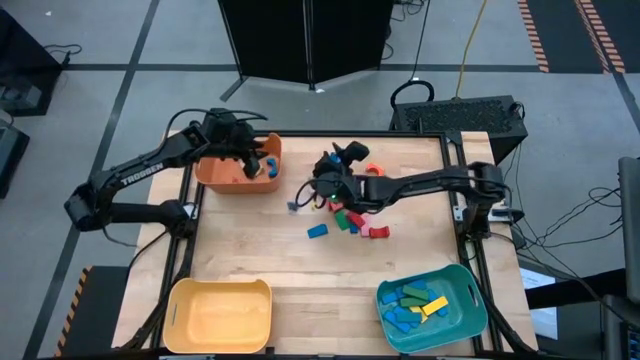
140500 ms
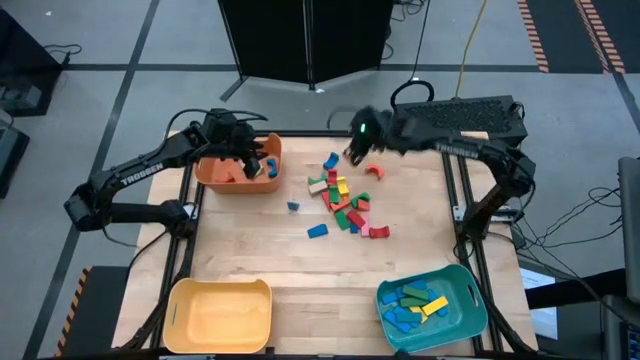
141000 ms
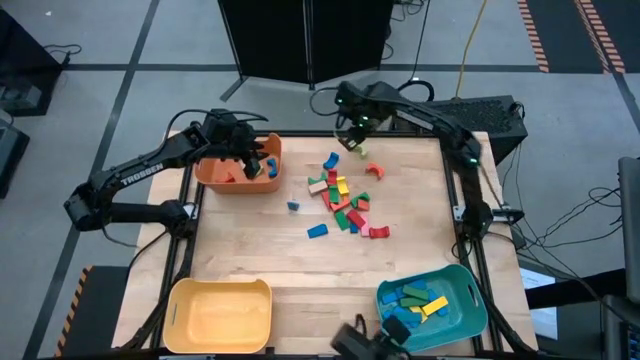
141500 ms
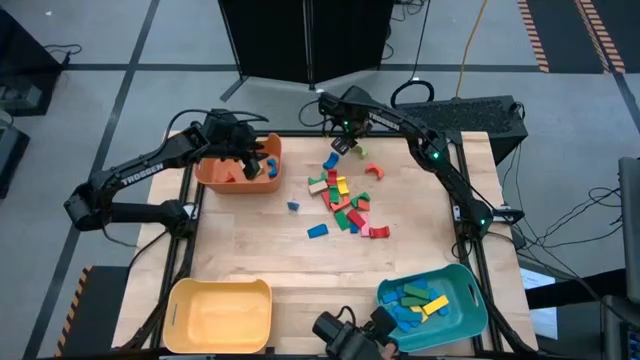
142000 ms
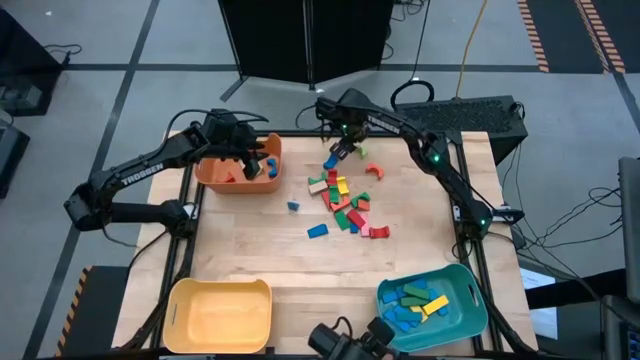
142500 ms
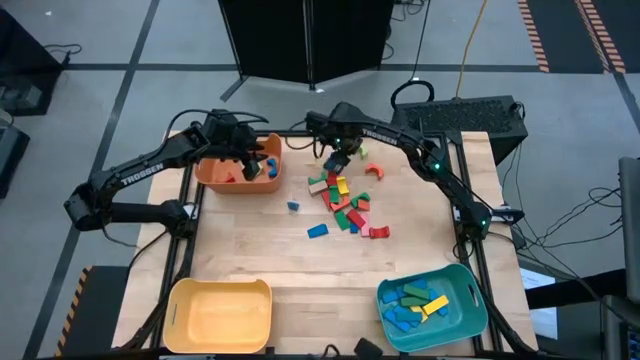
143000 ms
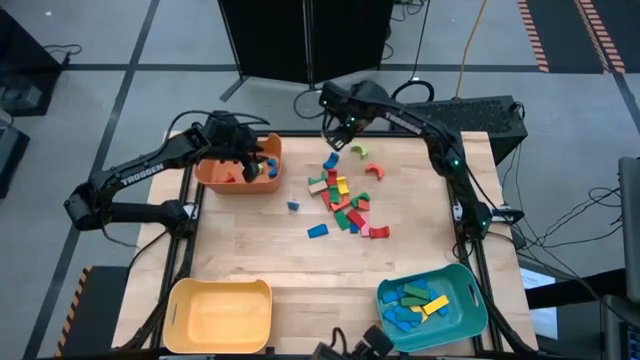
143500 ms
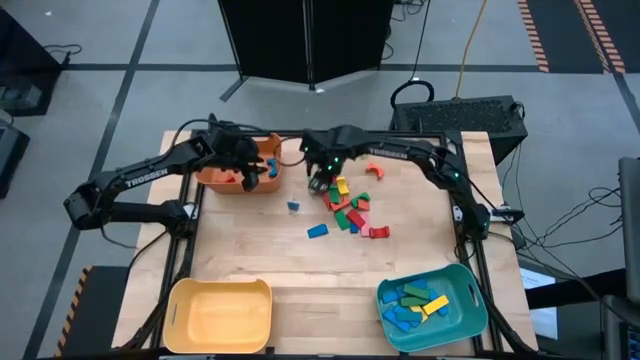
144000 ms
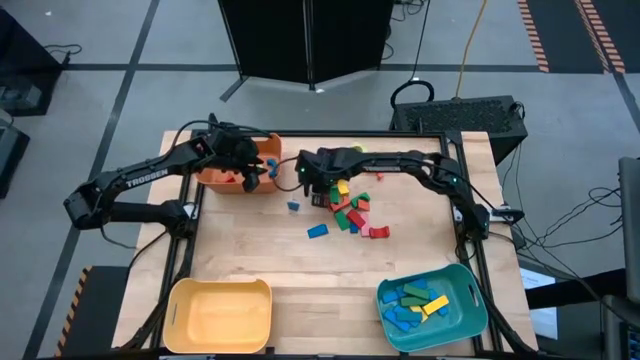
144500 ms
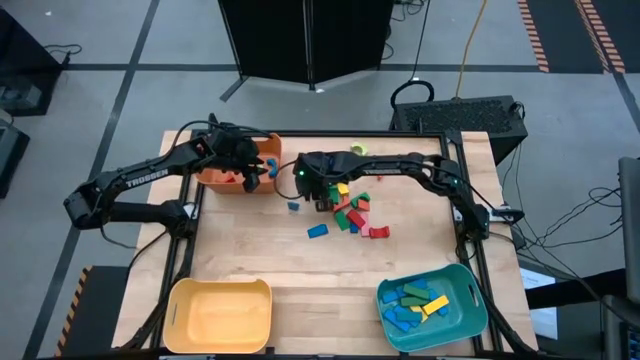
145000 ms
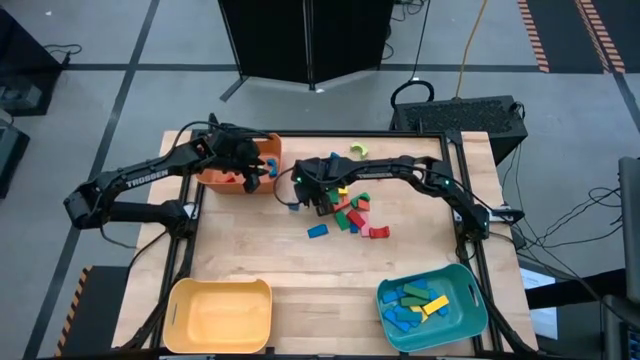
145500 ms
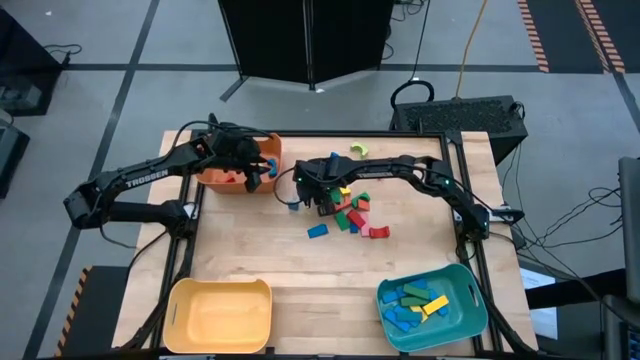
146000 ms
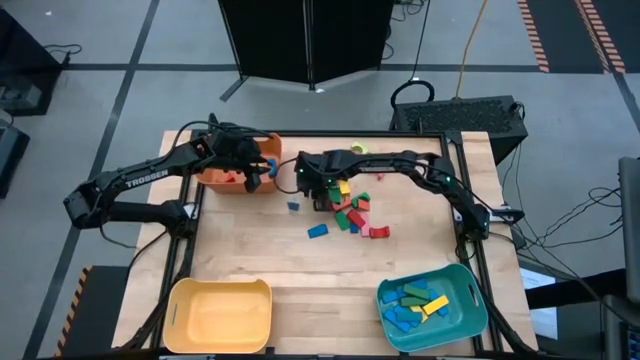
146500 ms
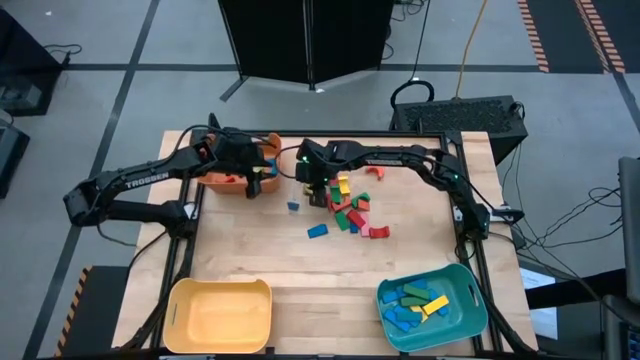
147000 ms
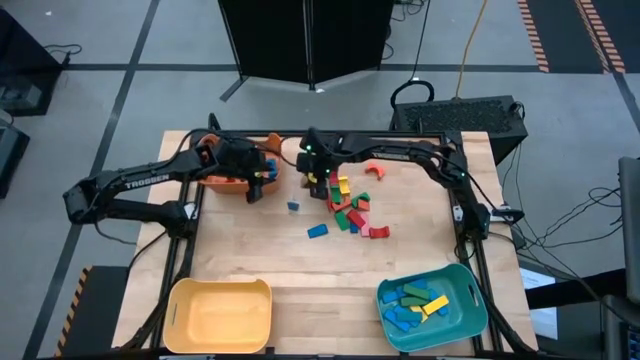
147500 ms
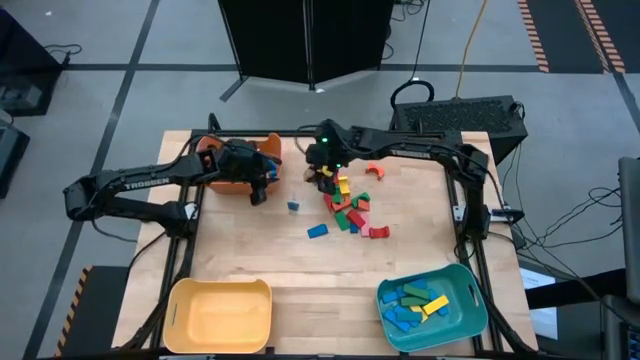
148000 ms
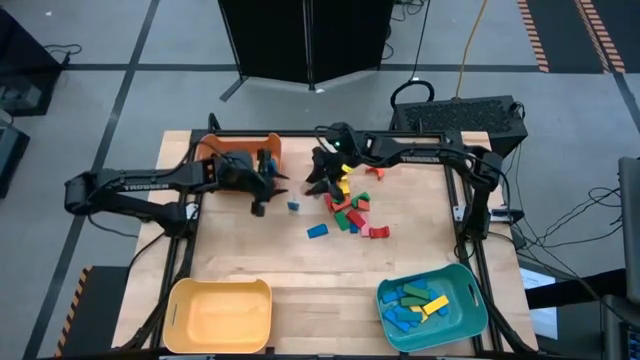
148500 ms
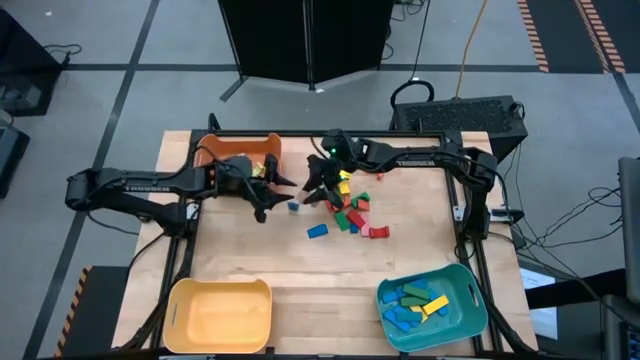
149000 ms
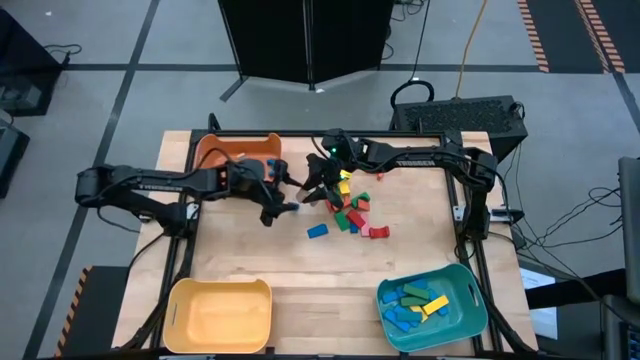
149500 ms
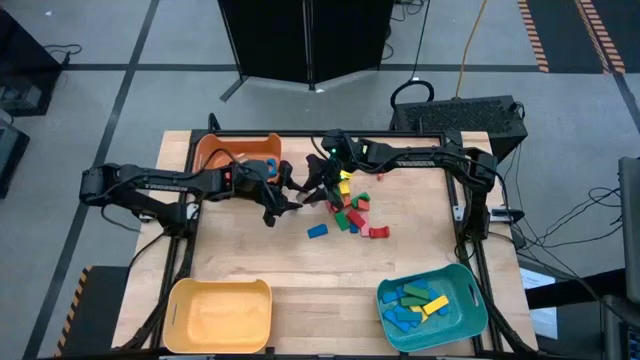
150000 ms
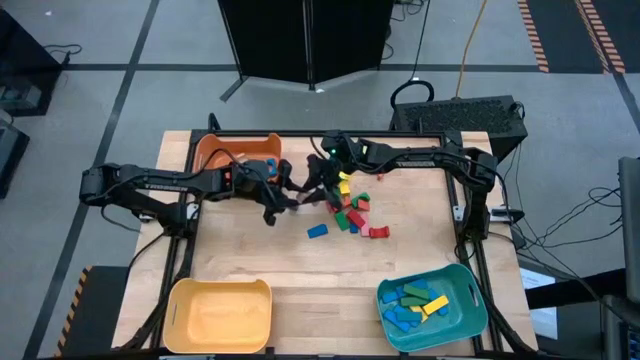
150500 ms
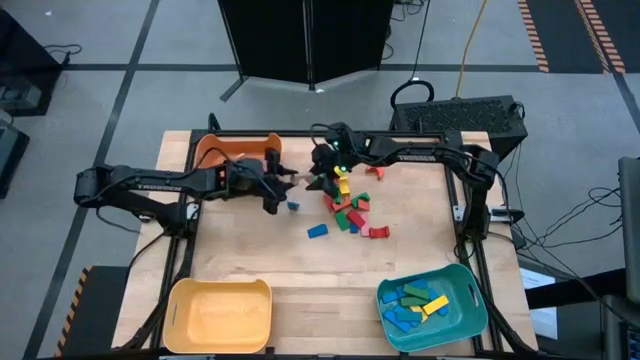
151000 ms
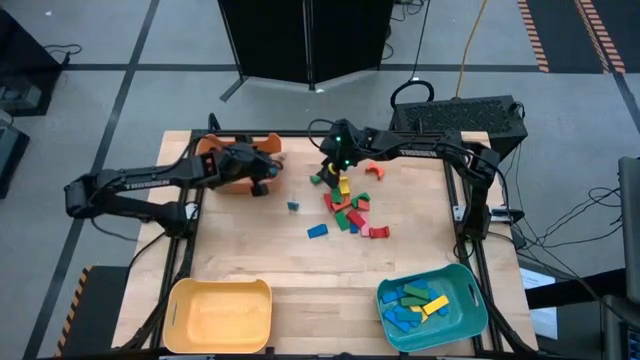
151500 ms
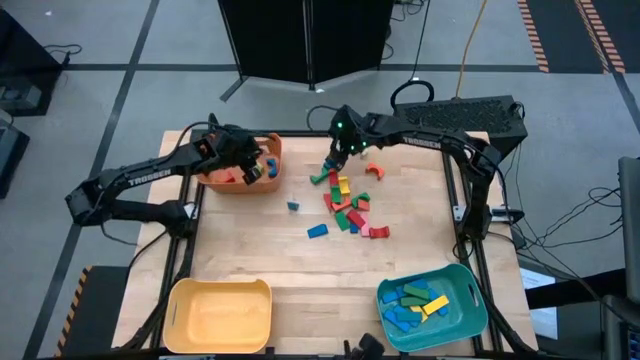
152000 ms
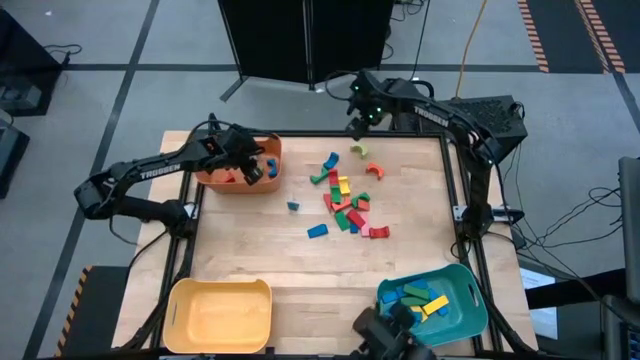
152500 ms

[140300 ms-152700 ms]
Task: Sort blocks by size
Put the light brown arch block into the orange bin

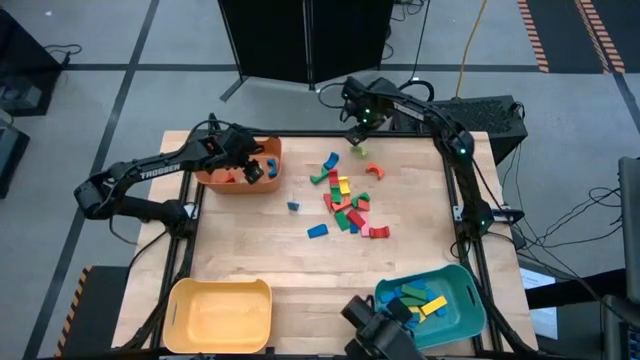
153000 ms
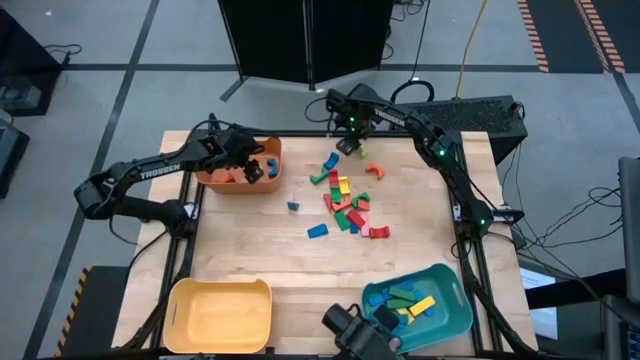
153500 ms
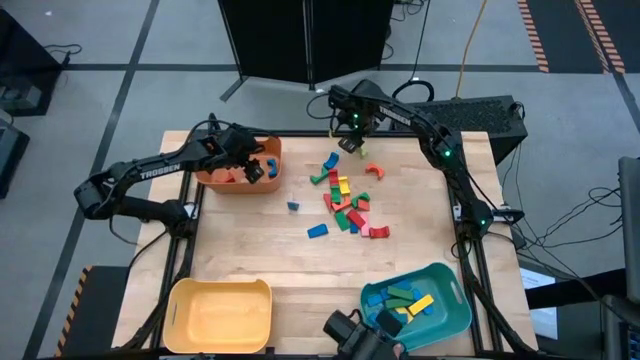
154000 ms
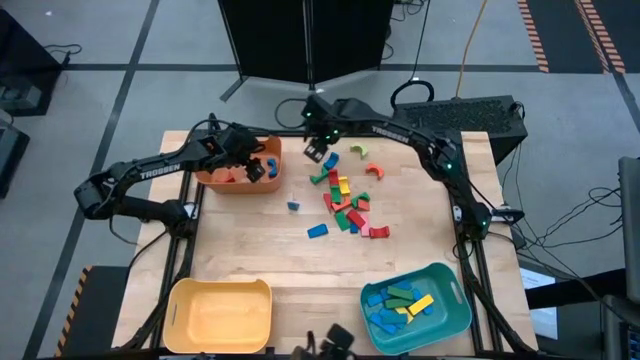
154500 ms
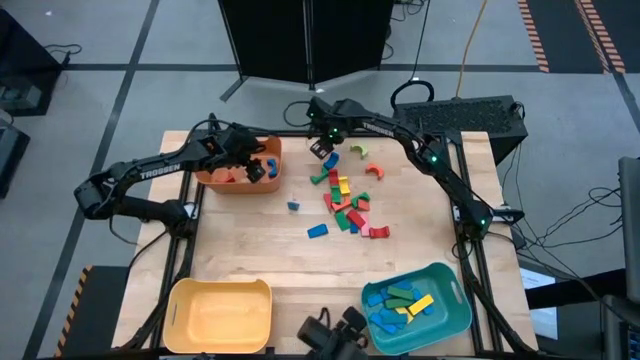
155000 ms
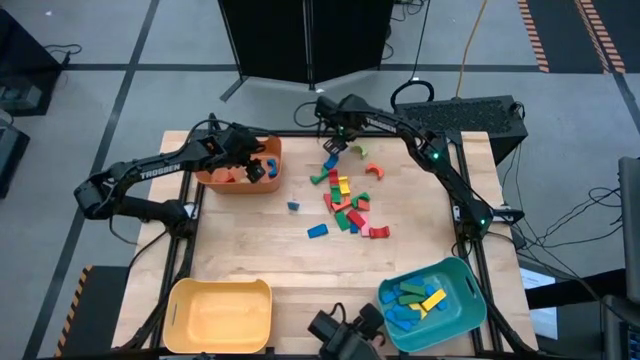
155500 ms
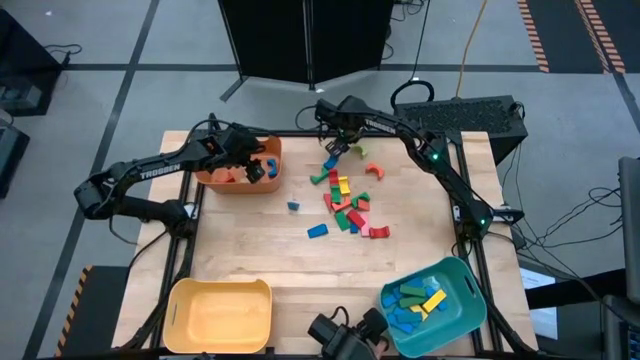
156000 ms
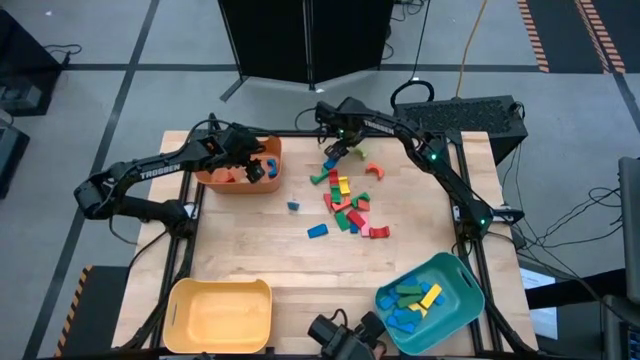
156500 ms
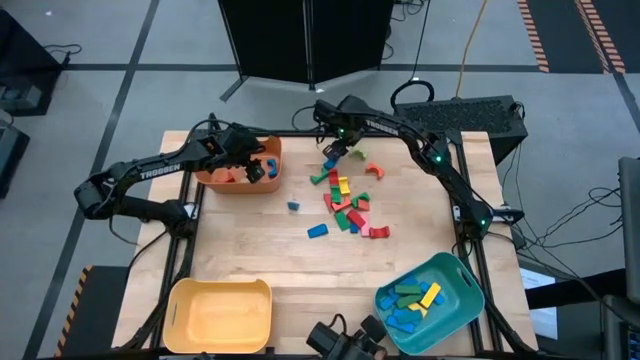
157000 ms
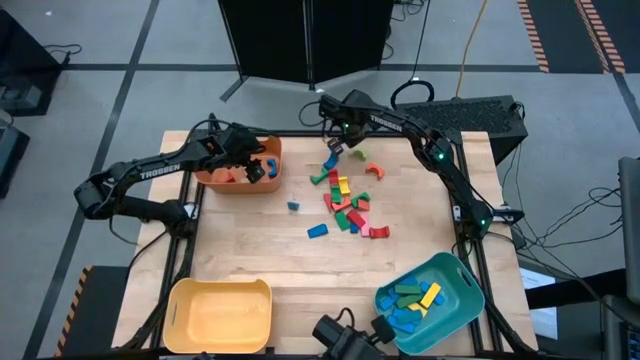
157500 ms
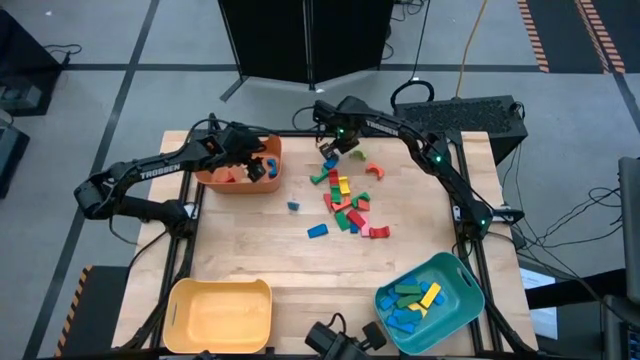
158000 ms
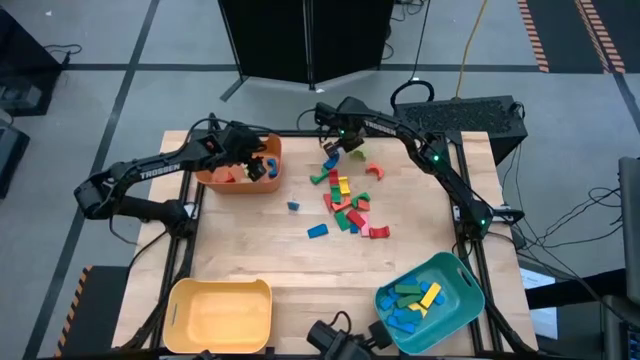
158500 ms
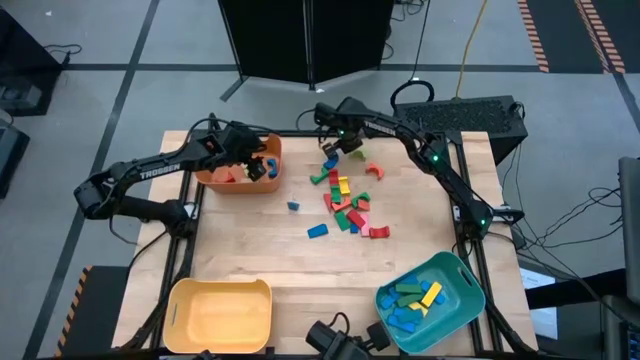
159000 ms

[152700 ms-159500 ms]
Put the light green arch block into the orange bin

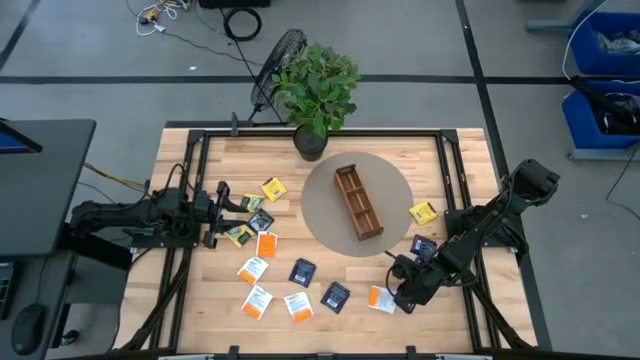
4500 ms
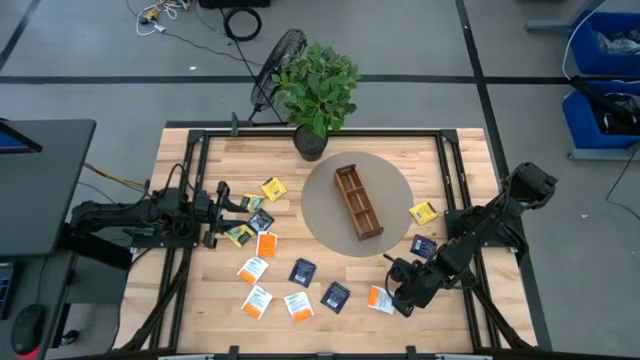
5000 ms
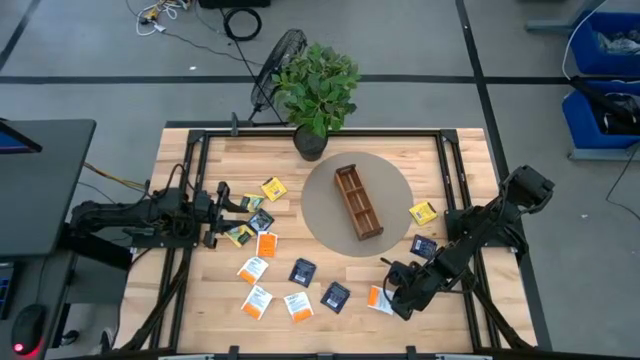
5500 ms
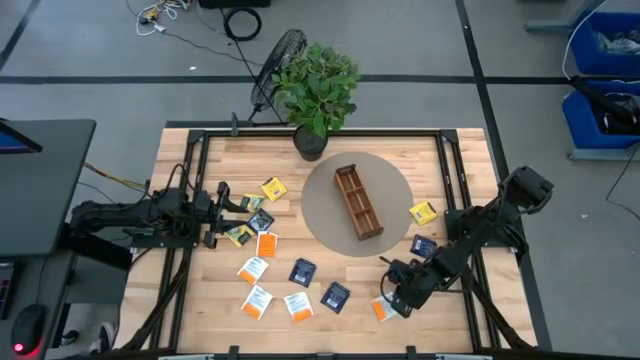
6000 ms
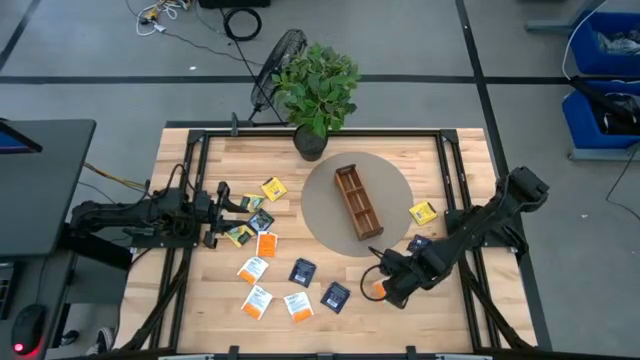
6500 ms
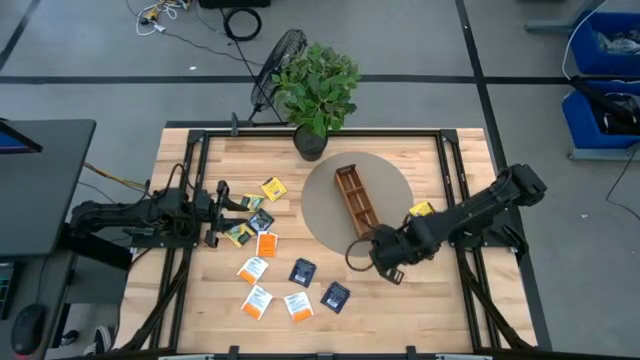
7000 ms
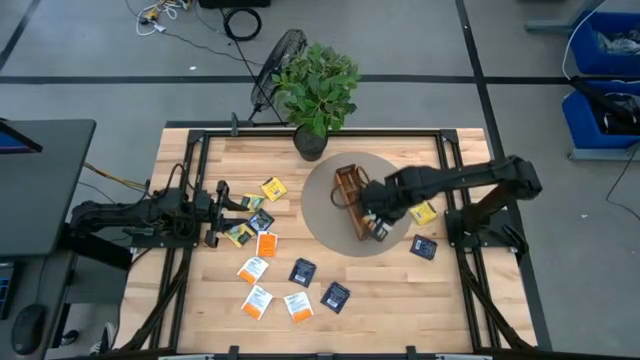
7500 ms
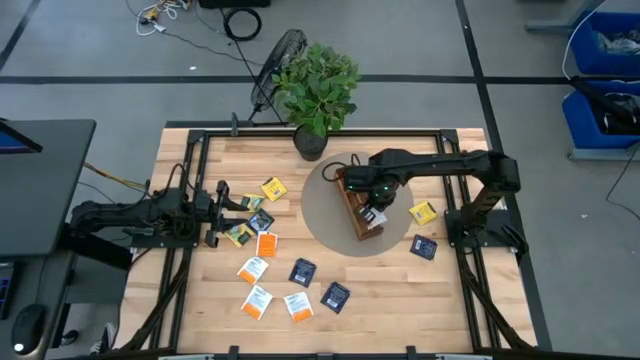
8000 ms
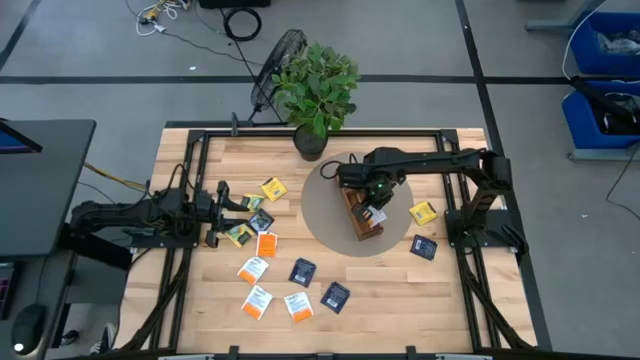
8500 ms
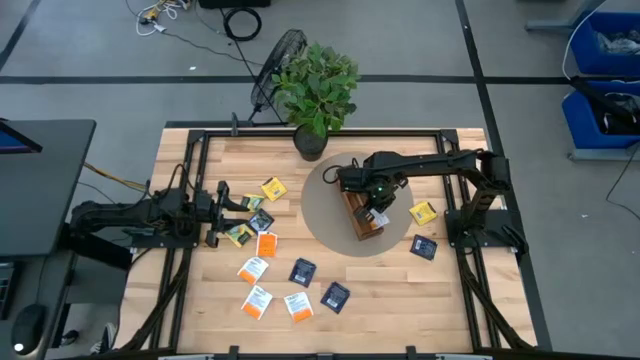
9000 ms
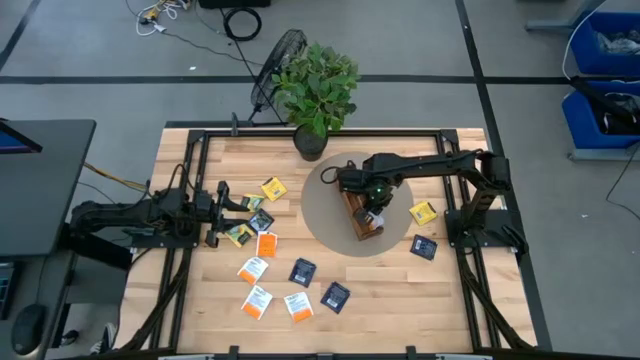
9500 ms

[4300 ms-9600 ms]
Task: Pick & Place Tea
Put the white tea bag into the bottom section of the wooden organizer
